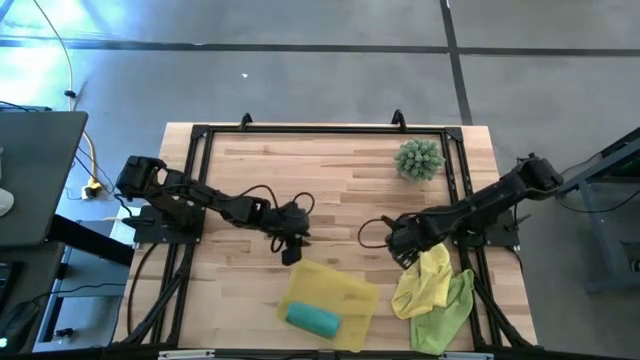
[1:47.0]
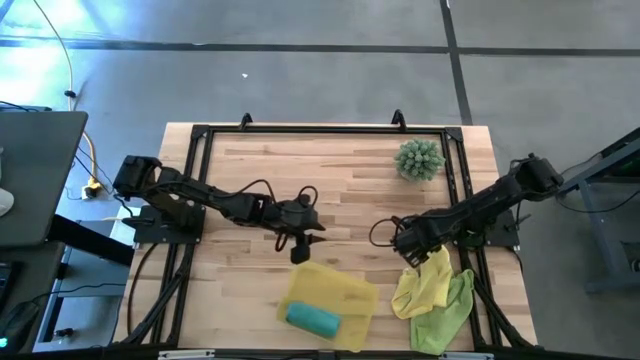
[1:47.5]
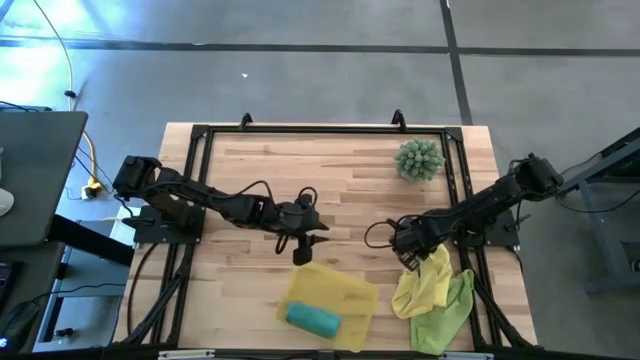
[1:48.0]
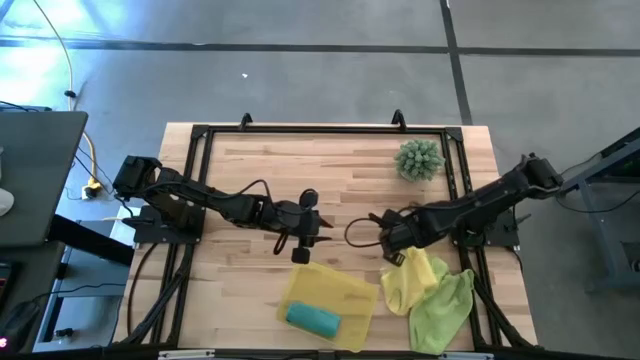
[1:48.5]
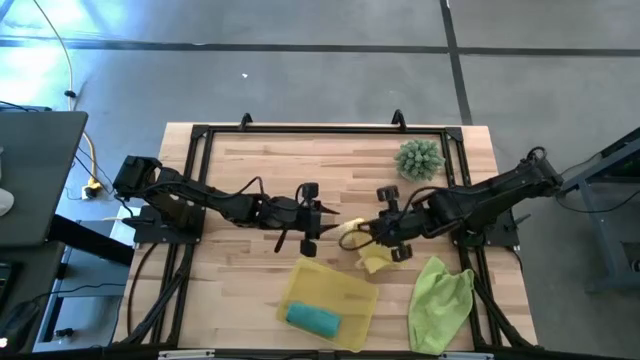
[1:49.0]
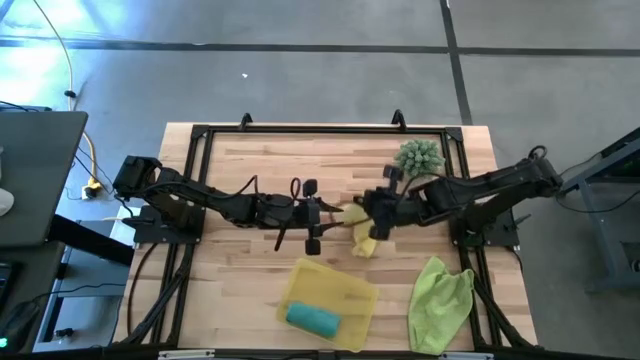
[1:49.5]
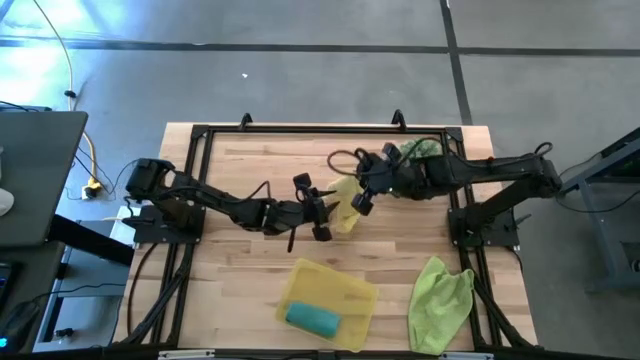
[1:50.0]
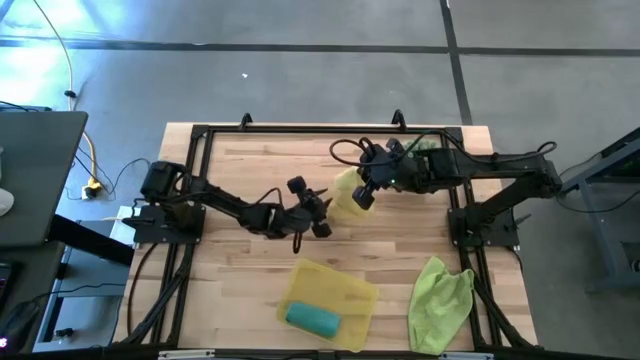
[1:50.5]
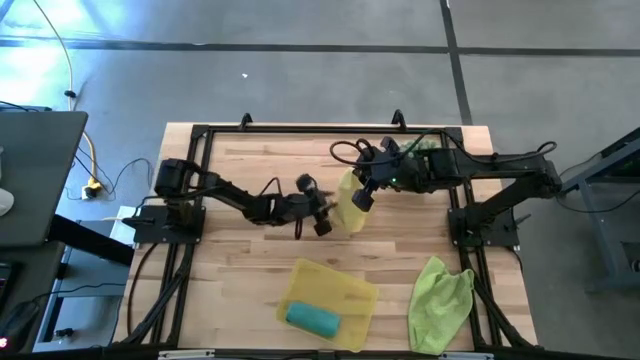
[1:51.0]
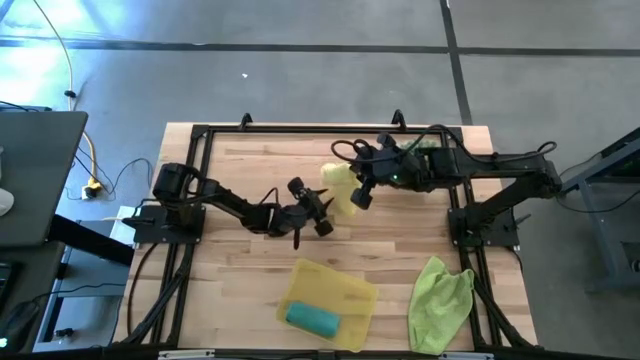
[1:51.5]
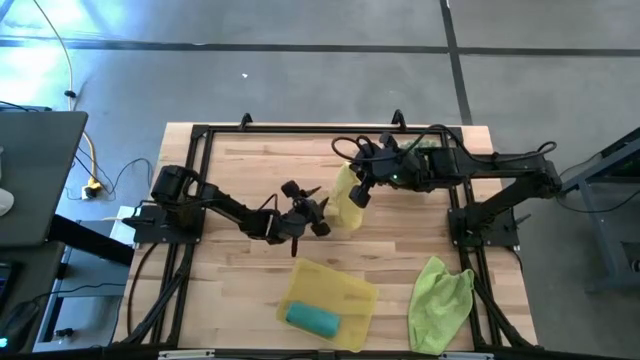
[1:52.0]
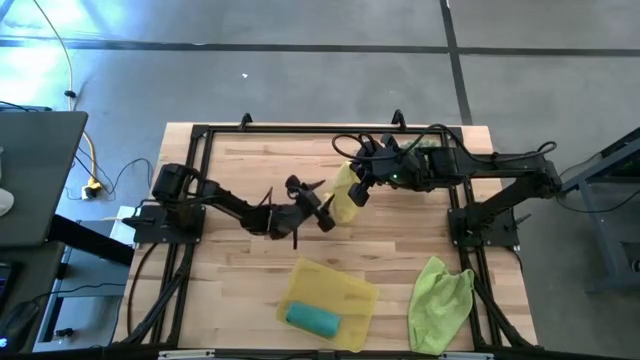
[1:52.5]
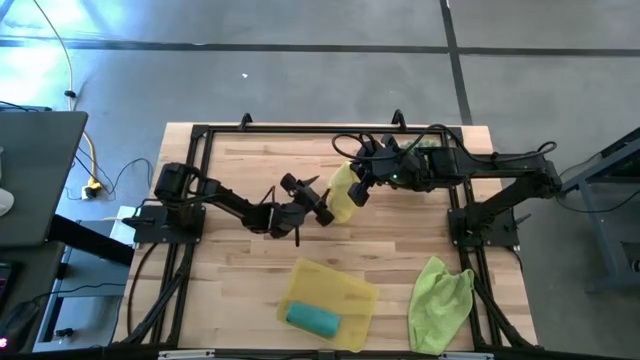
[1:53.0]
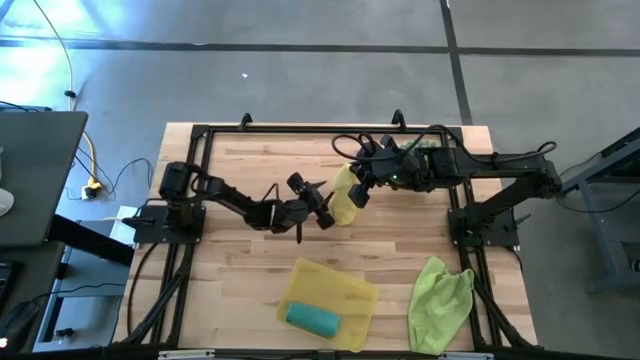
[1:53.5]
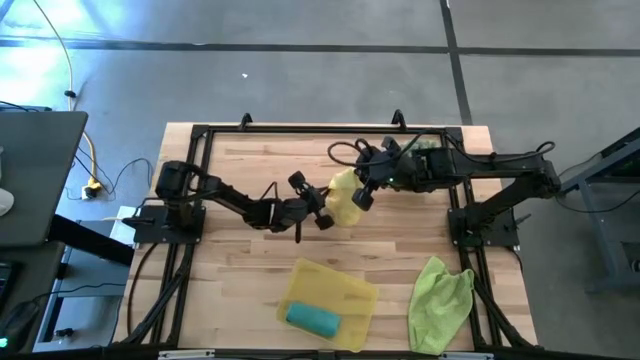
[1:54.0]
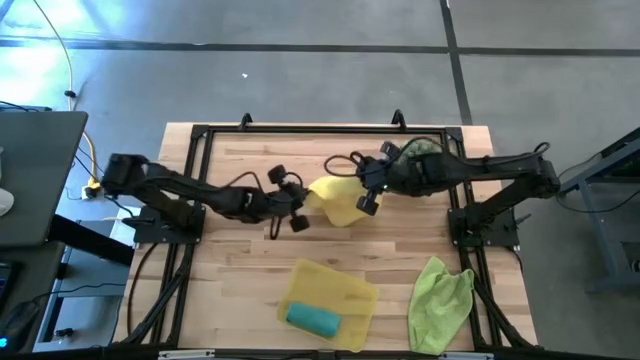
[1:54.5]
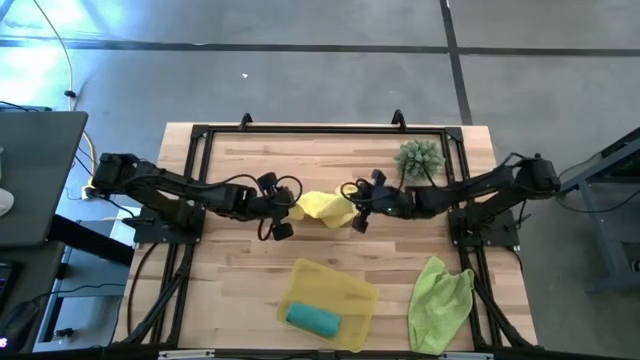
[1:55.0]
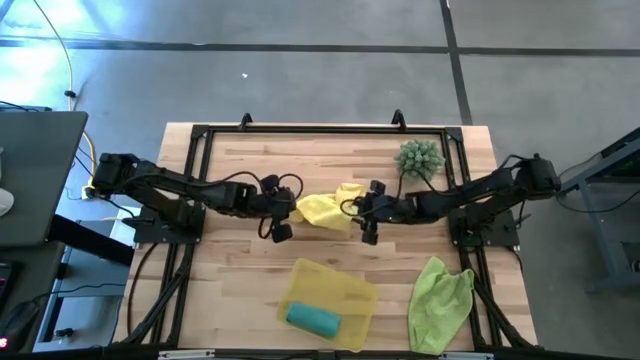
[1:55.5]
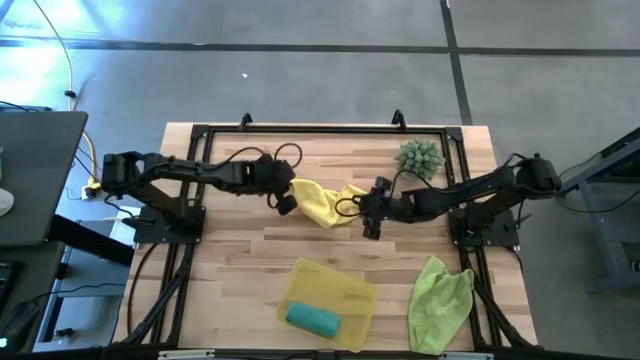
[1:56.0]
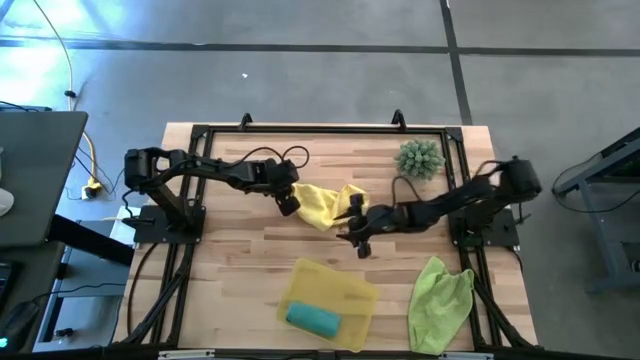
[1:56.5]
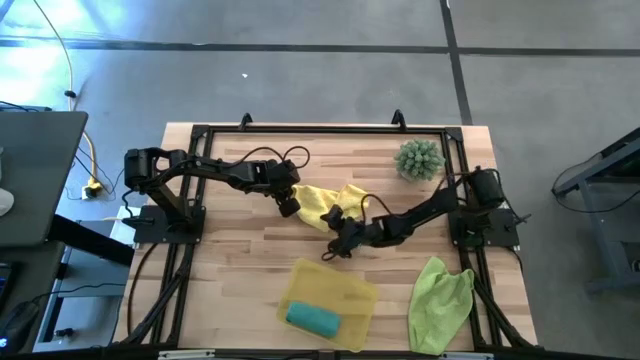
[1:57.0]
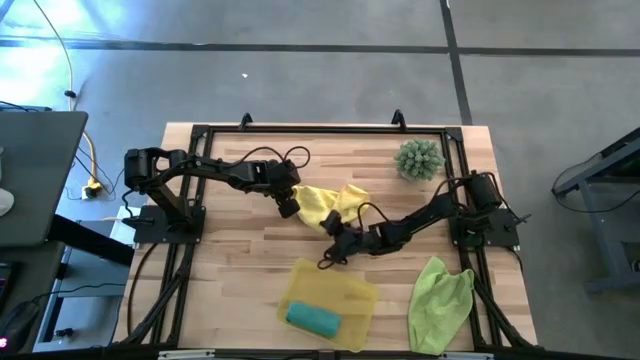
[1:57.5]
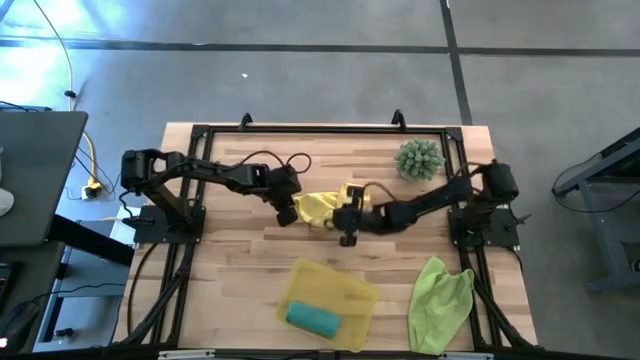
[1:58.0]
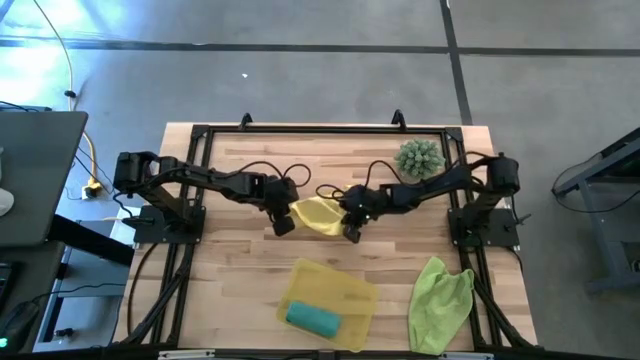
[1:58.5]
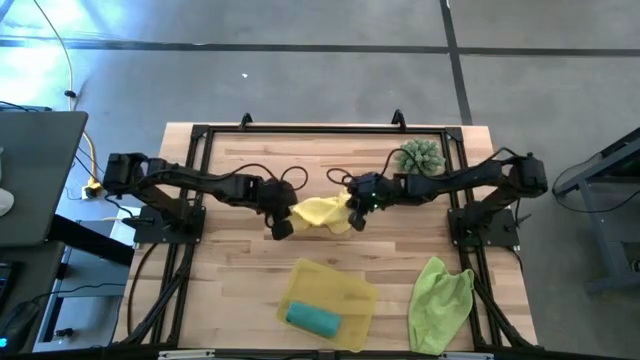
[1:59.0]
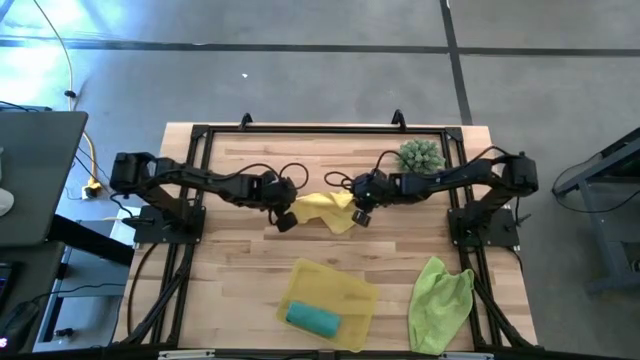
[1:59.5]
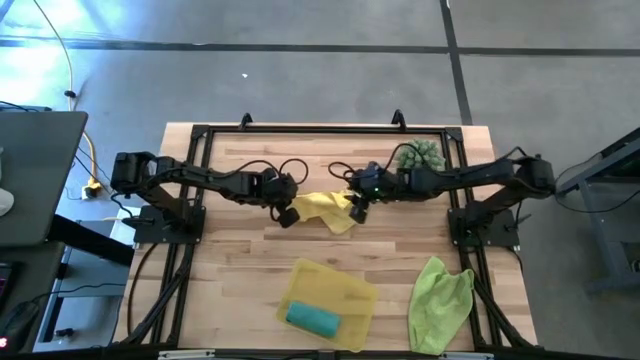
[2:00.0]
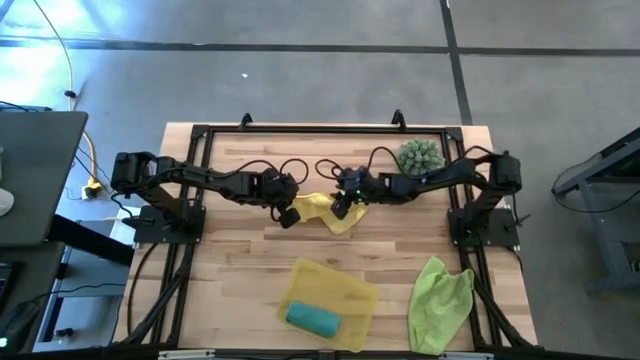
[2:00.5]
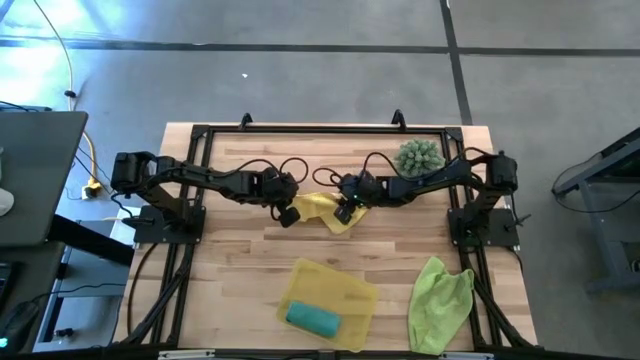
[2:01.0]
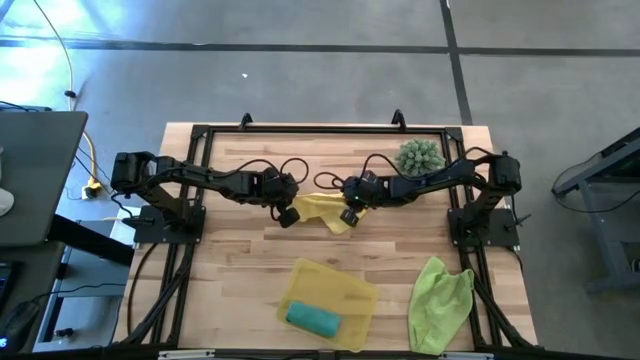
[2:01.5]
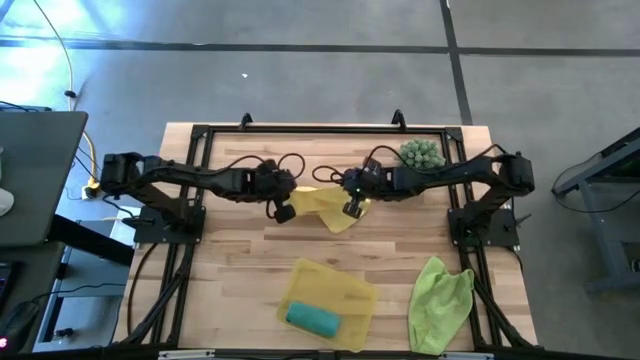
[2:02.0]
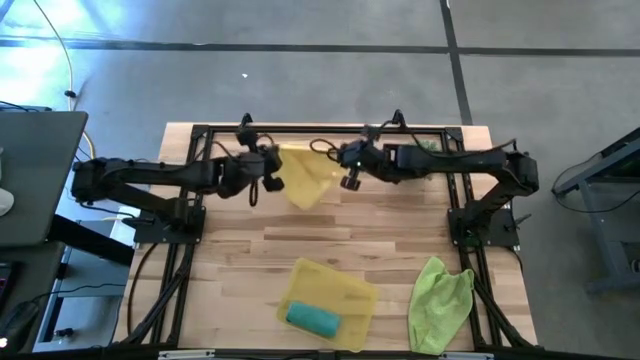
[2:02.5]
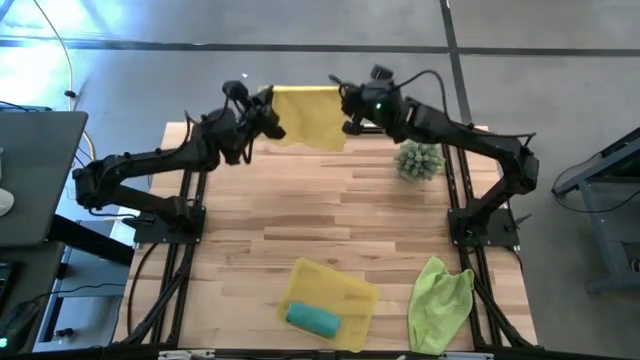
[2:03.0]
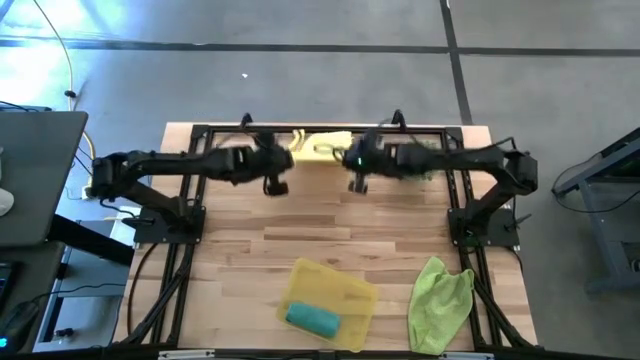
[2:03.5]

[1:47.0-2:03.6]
Task: Roll microfiber towels into tight, uniform cylinder then place into a basket
Fold the yellow towel

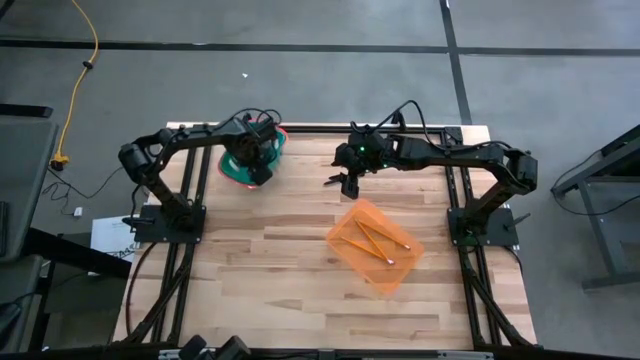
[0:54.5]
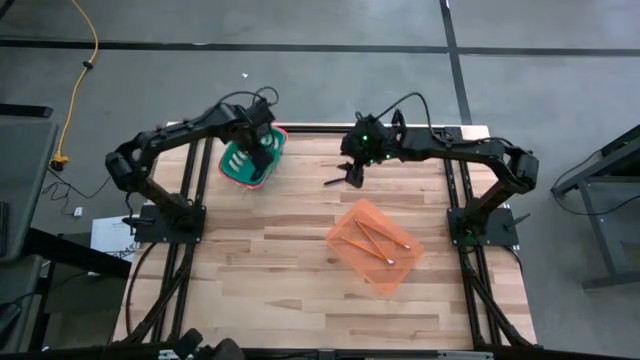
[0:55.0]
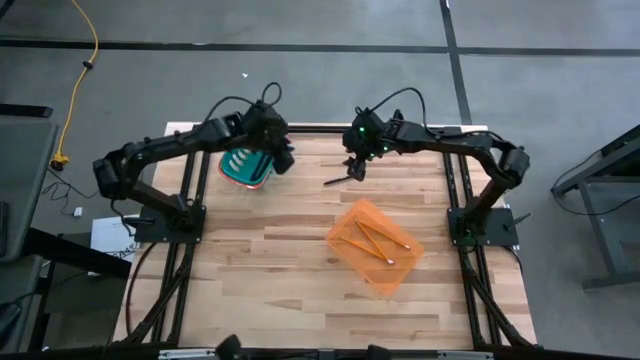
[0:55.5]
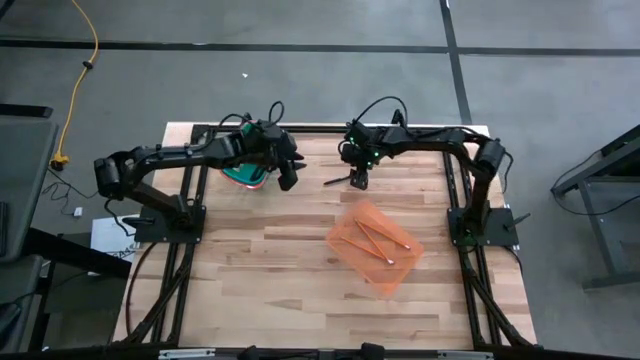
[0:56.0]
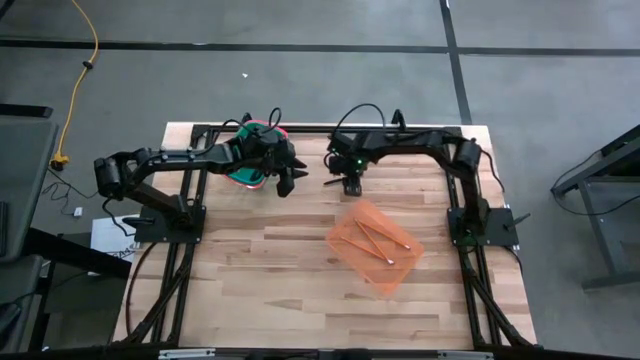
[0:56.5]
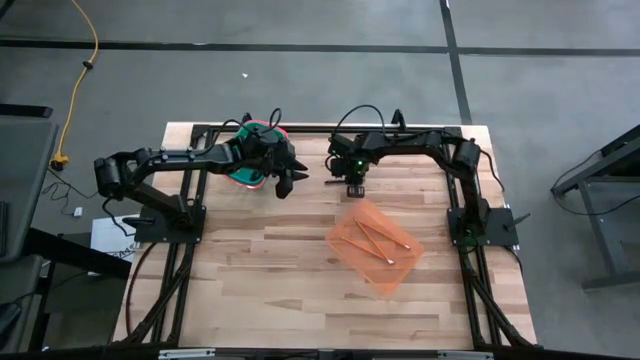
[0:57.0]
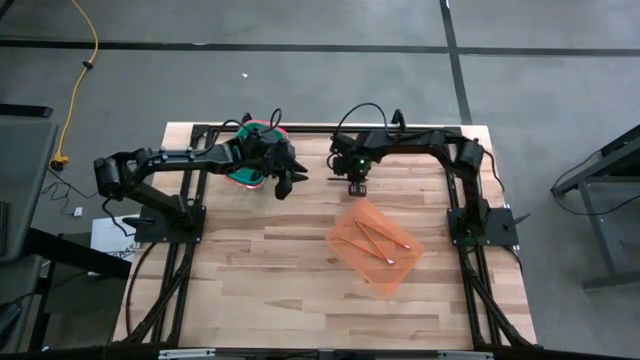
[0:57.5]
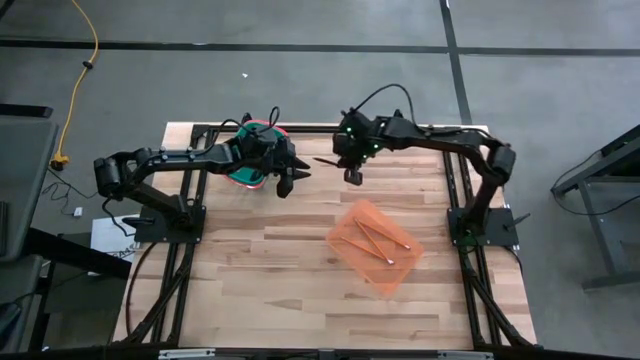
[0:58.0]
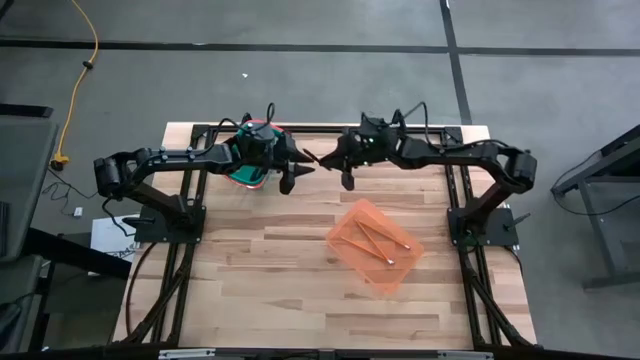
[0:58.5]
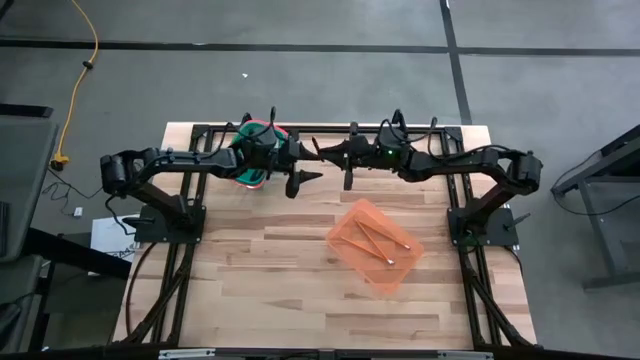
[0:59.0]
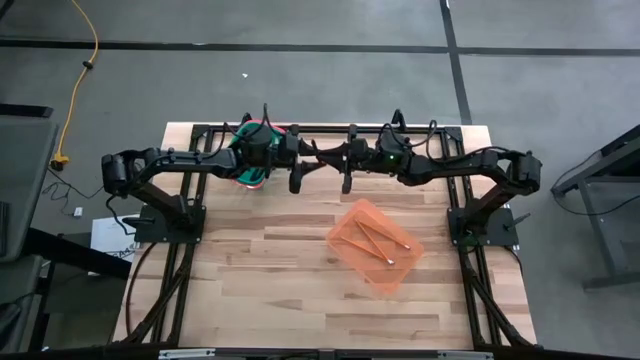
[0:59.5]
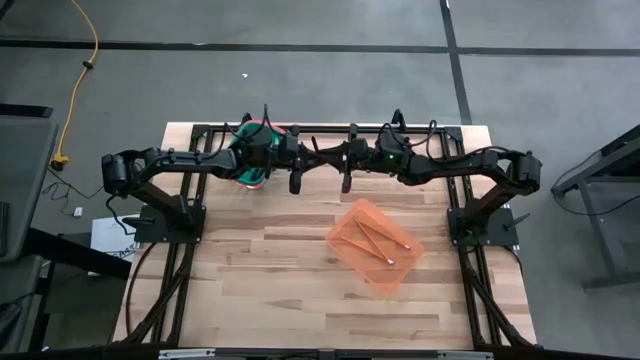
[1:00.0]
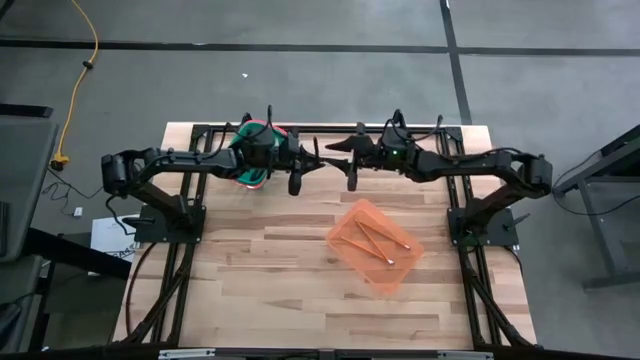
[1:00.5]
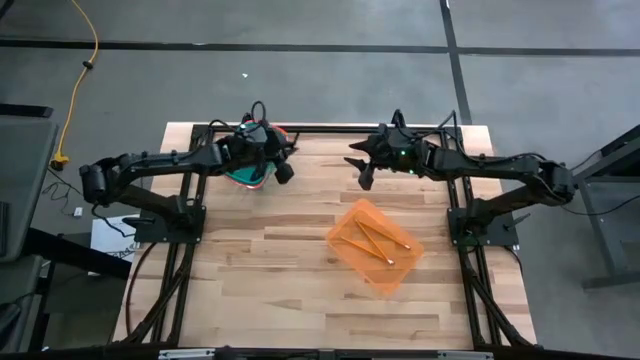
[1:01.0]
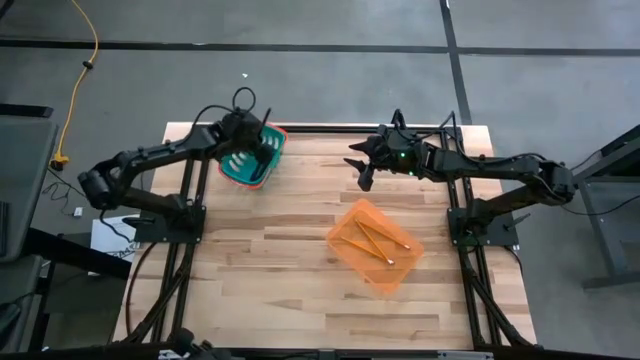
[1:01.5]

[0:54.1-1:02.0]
Task: Sort pens & pencils
Put the black pen into the blue bin
